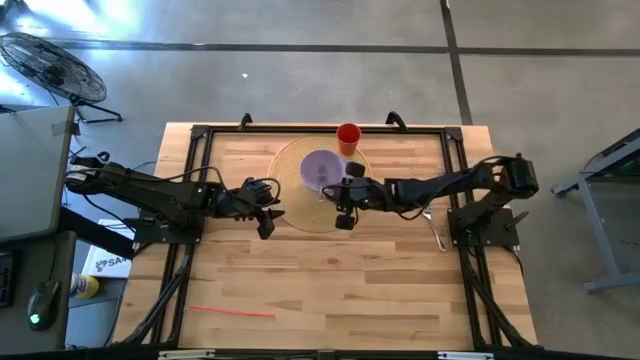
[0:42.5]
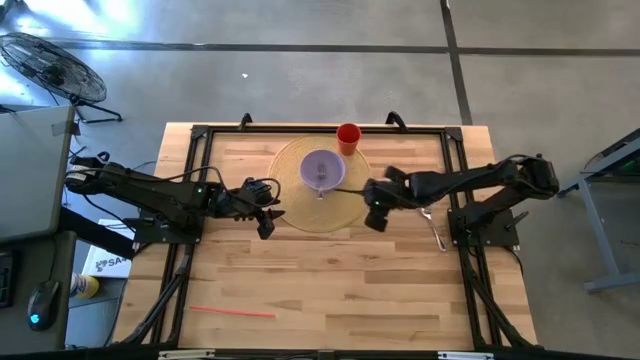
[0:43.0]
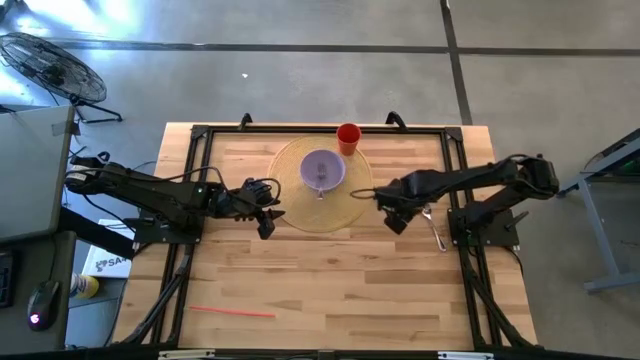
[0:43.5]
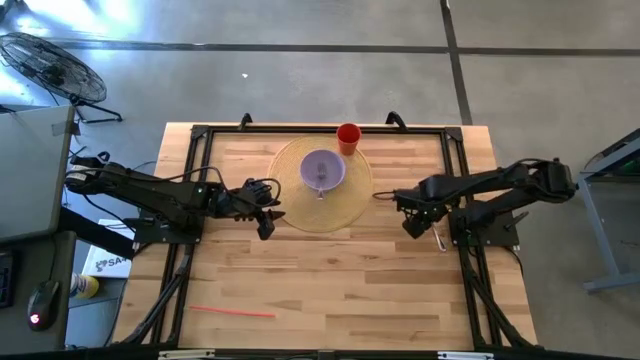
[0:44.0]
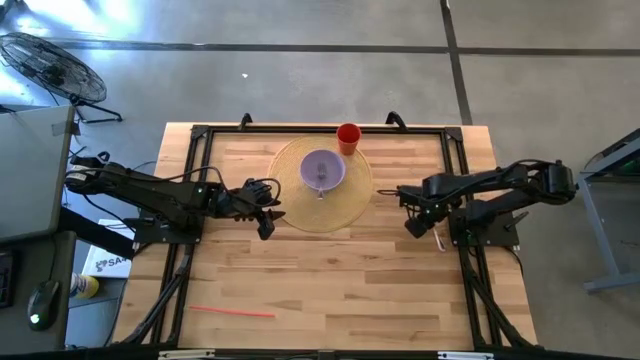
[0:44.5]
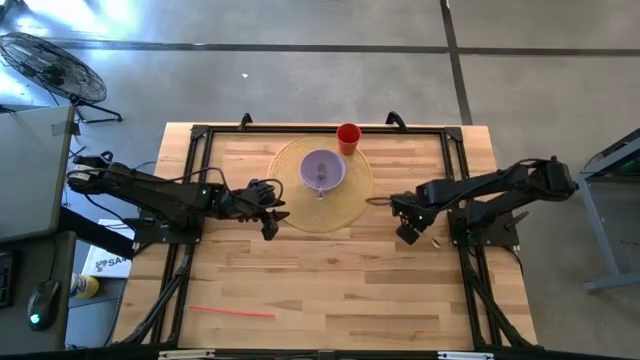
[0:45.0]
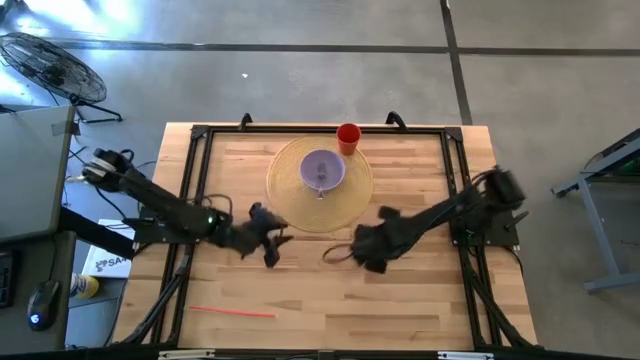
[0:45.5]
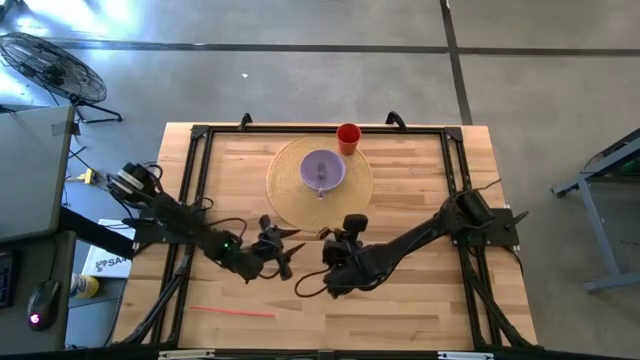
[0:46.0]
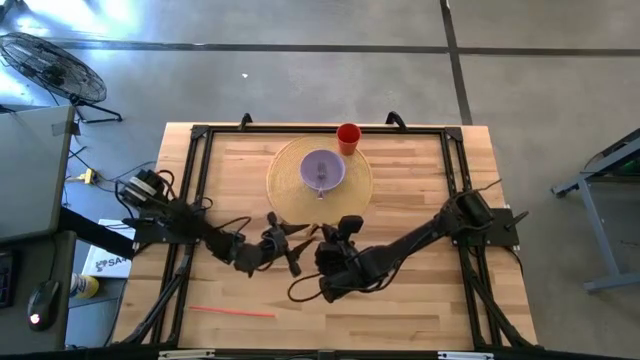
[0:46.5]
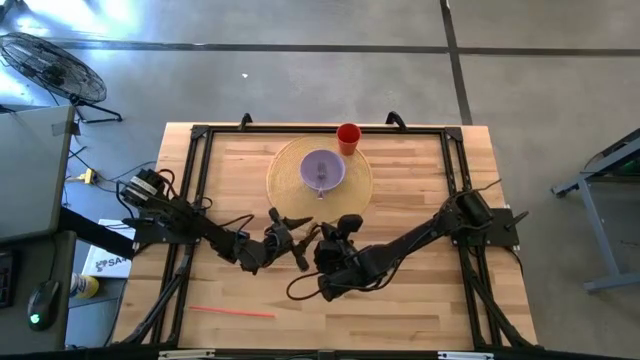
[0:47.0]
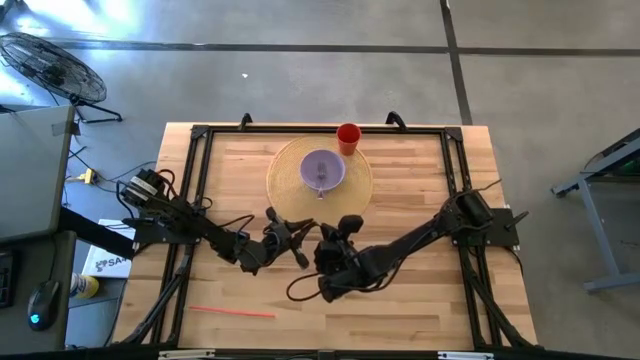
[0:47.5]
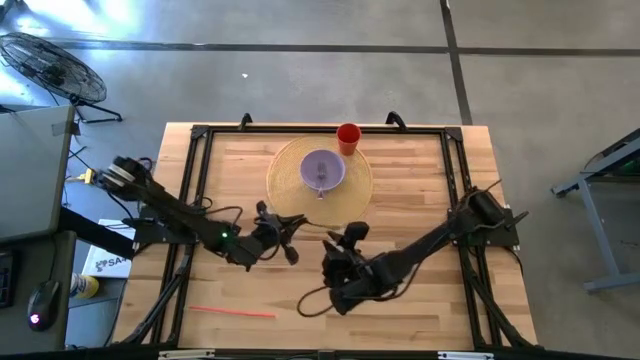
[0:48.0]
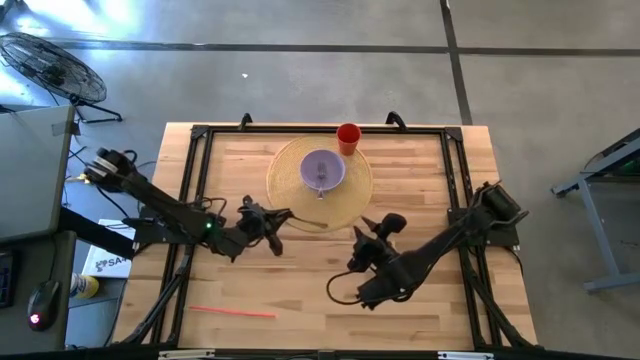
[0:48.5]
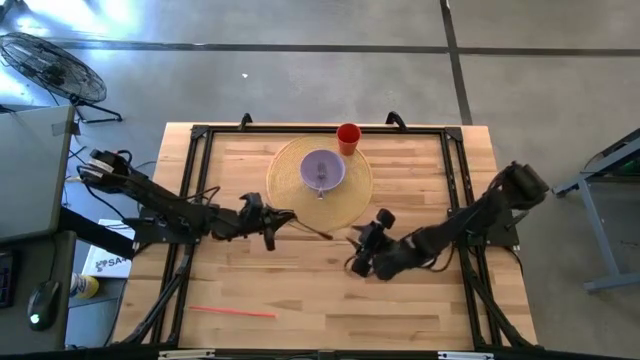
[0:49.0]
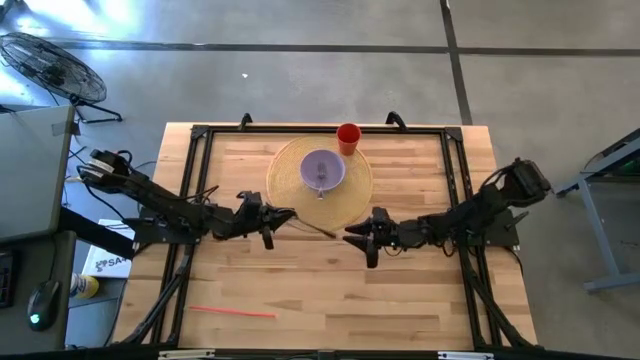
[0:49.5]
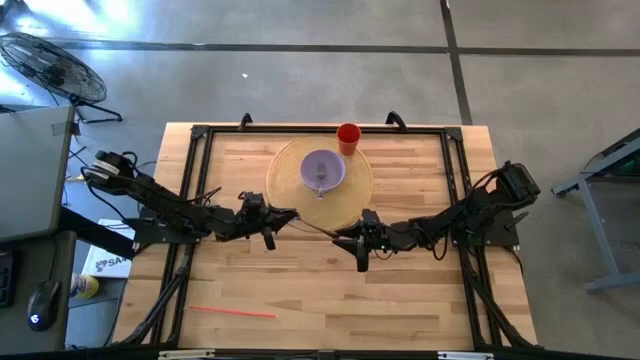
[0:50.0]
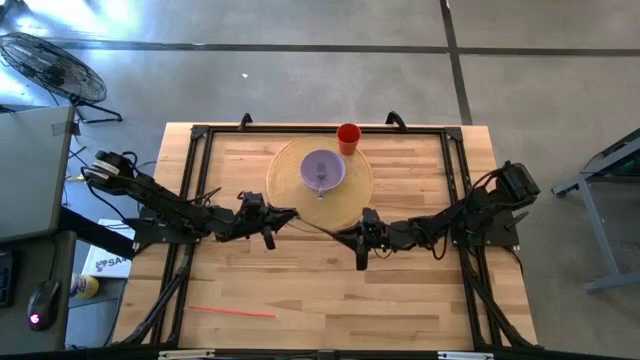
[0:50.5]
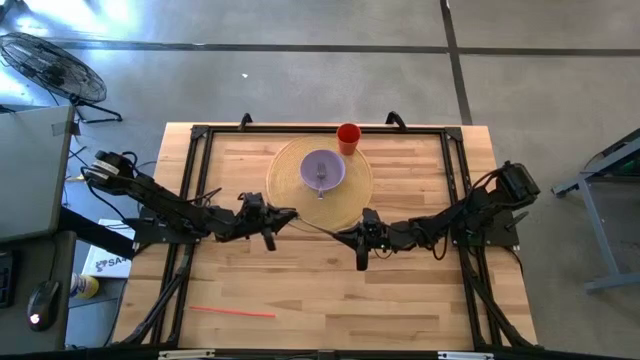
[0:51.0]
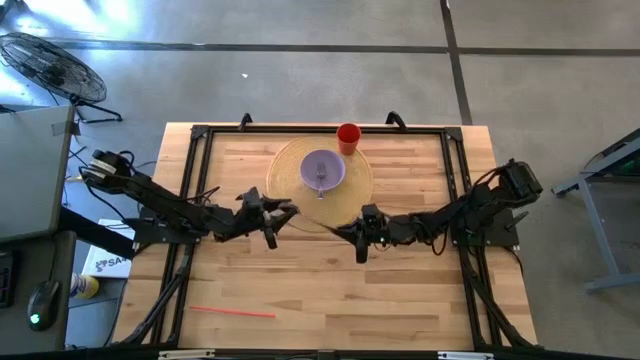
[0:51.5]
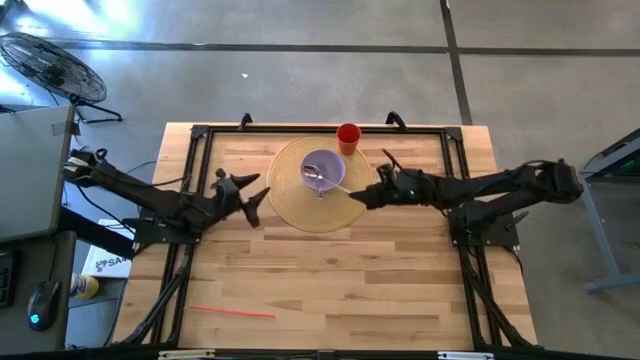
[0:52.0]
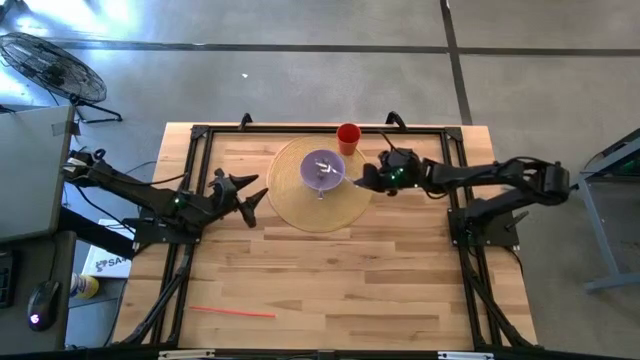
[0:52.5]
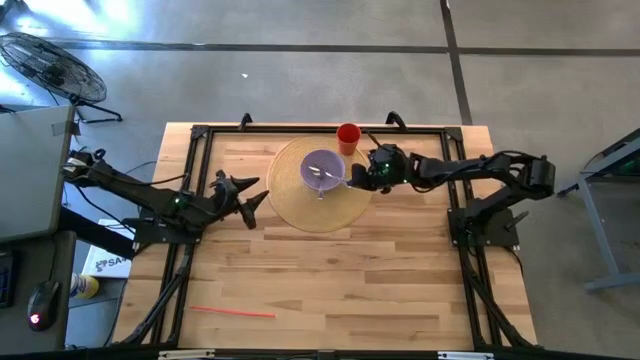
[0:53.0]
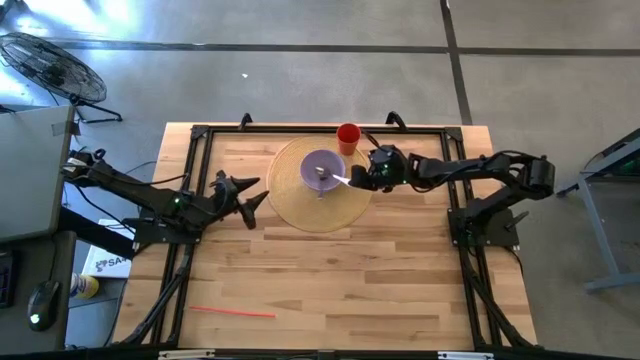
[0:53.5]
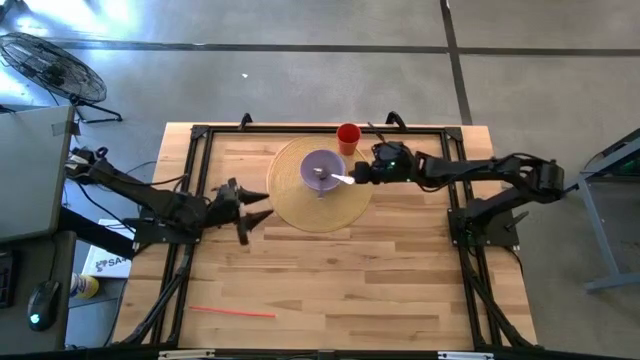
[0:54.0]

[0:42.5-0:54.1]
Task: Pick & Place Utensil
Put the spoon into the purple bowl

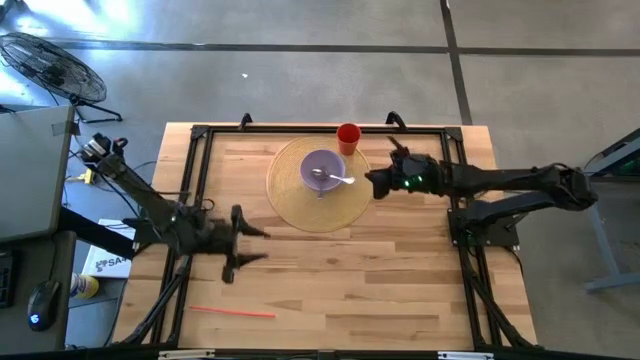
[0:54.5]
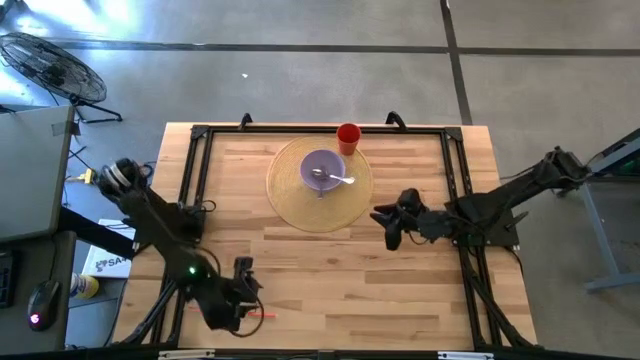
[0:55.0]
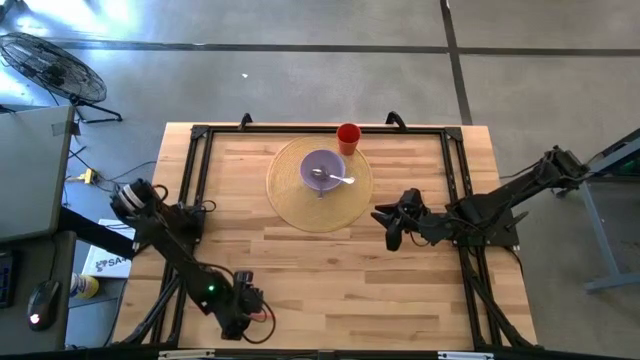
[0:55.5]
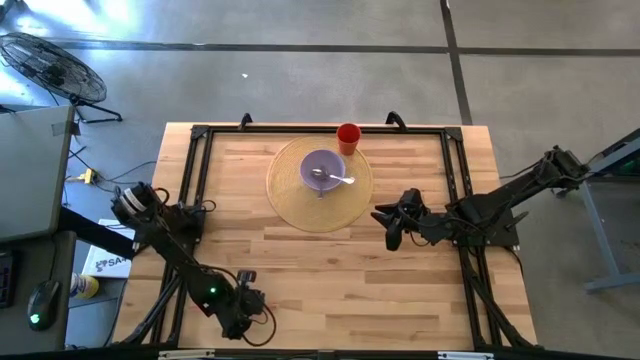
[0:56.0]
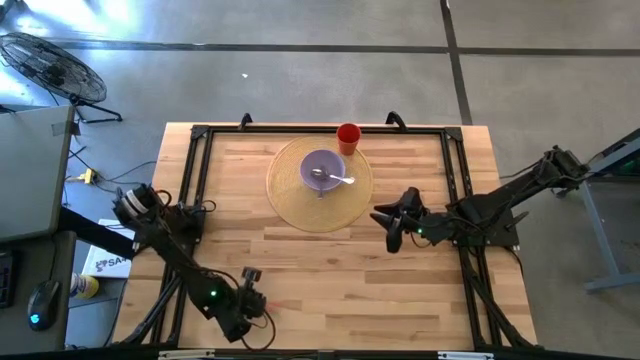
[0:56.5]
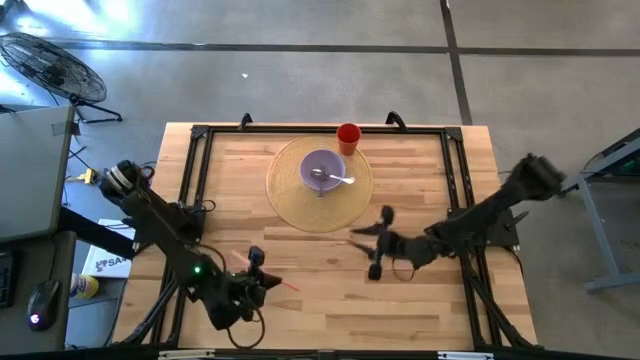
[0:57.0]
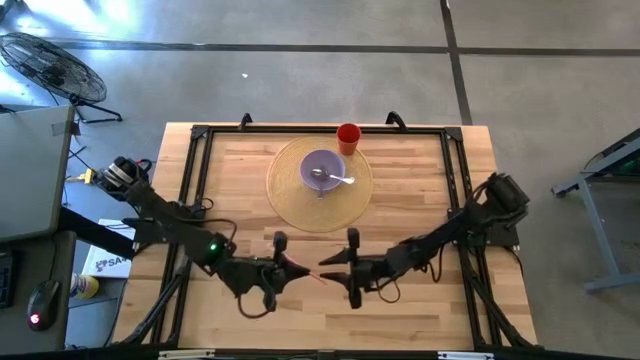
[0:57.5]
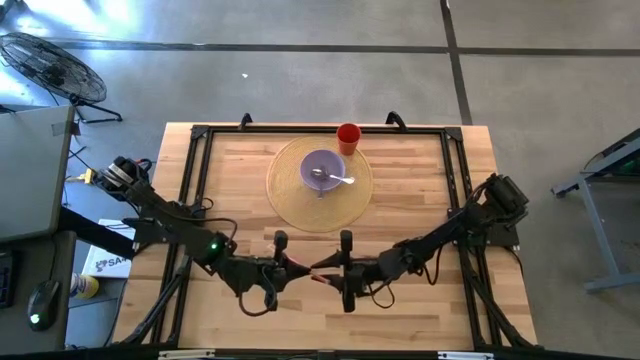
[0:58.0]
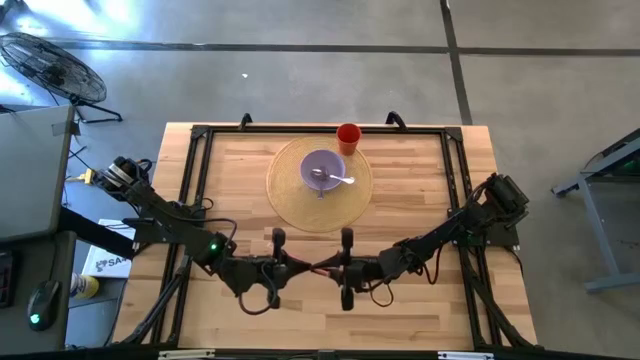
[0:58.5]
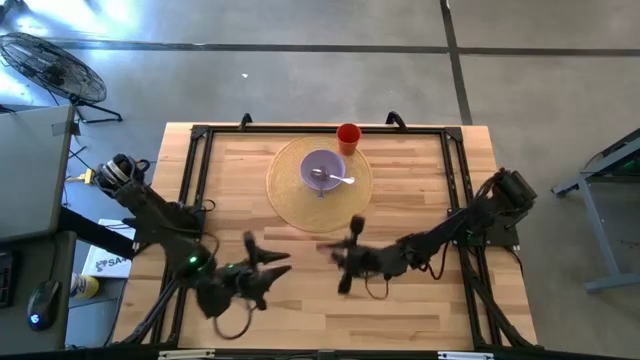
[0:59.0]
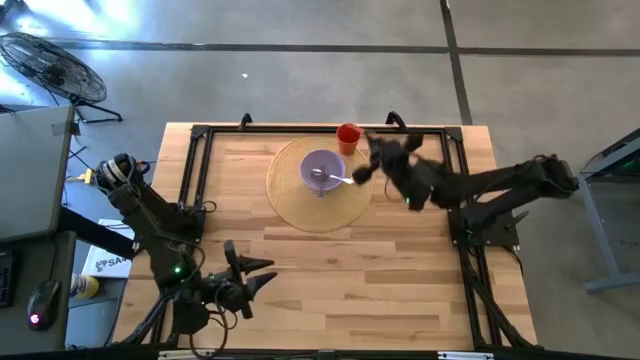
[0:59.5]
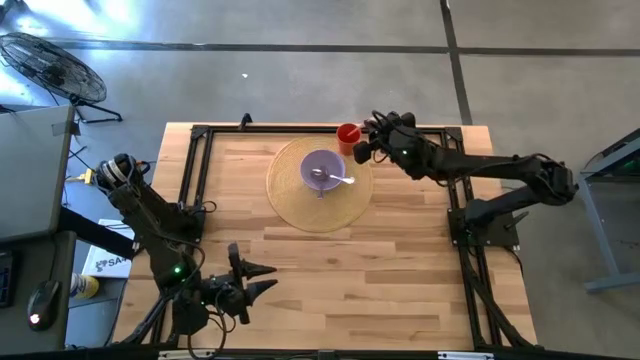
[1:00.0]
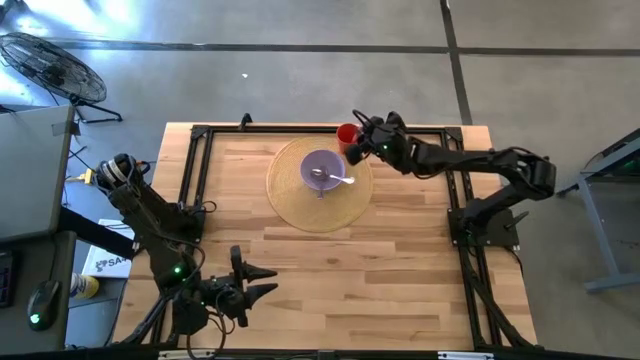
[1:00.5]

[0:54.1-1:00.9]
Put the orange straw into the orange cup

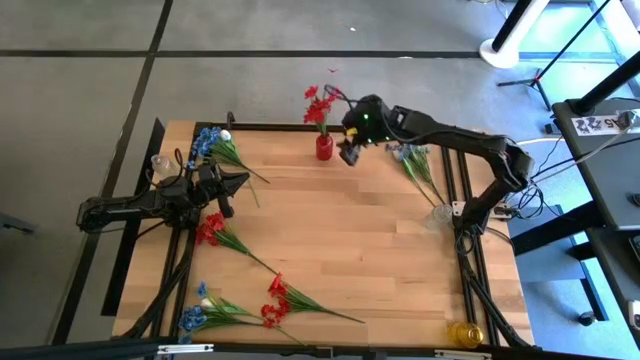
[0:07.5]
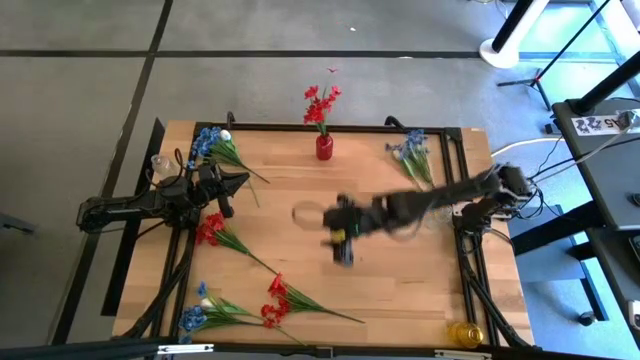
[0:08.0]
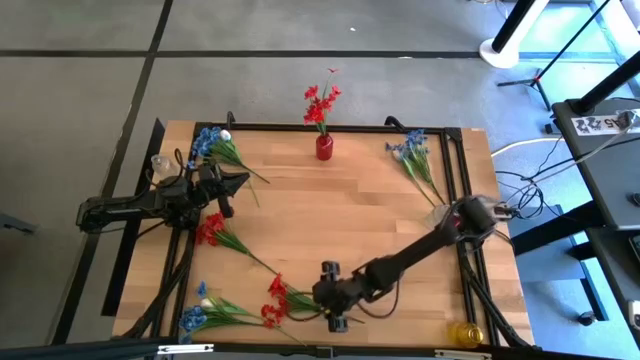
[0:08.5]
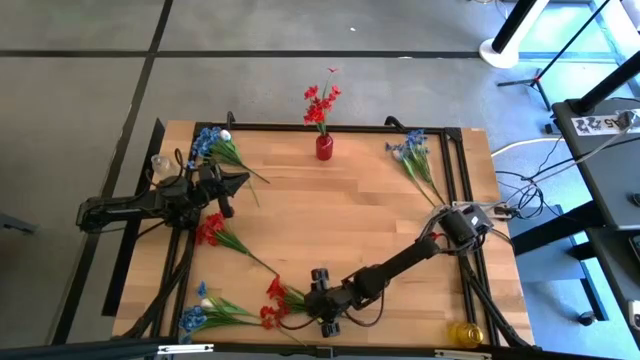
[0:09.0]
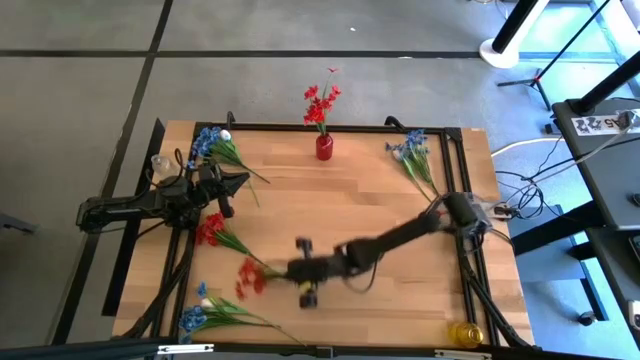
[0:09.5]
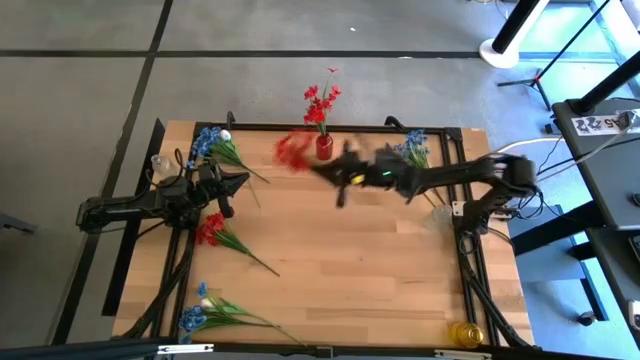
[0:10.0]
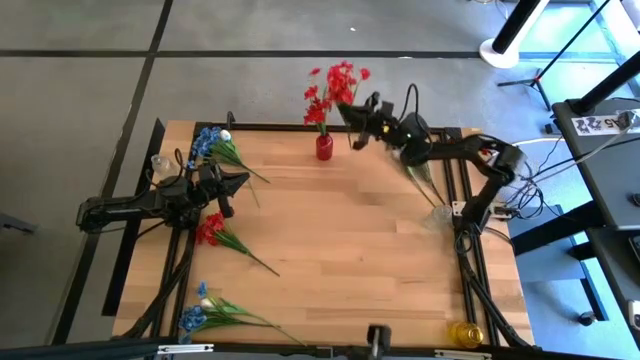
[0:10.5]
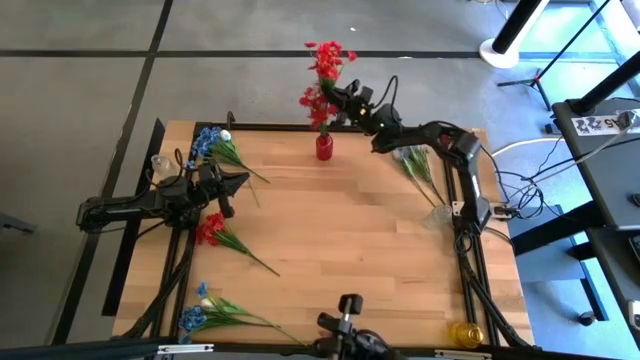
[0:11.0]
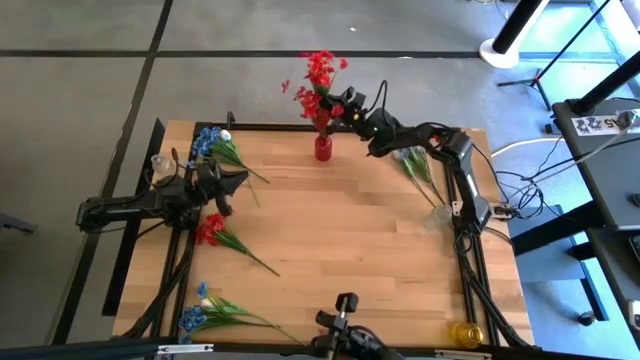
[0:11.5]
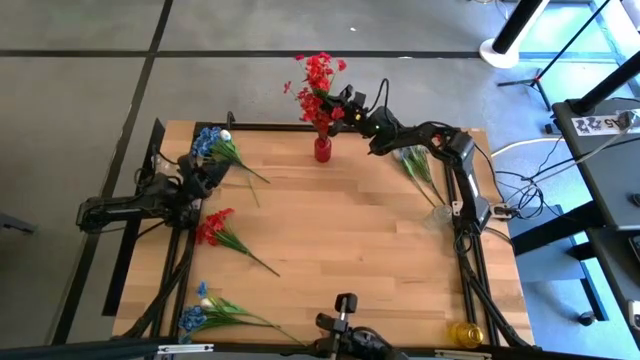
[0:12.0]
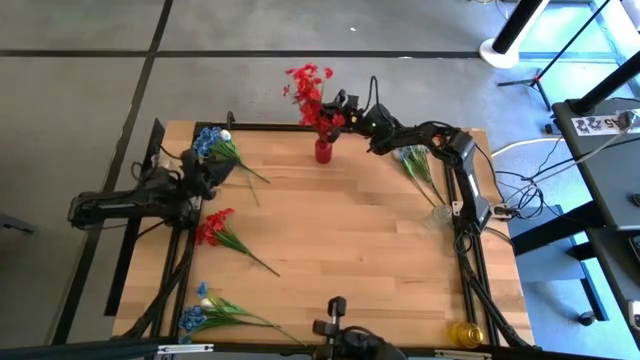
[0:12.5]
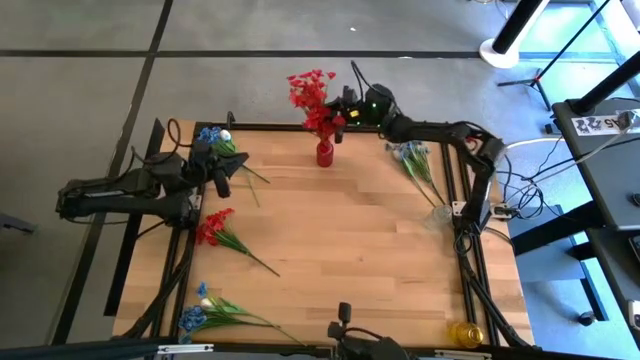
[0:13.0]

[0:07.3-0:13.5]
Task: Sort flowers into vase by color
Put the bottom red flowers into the red vase
